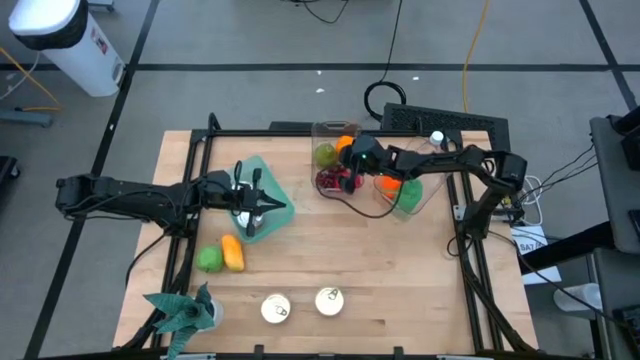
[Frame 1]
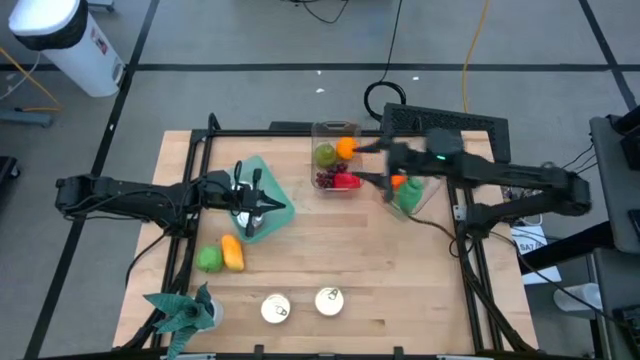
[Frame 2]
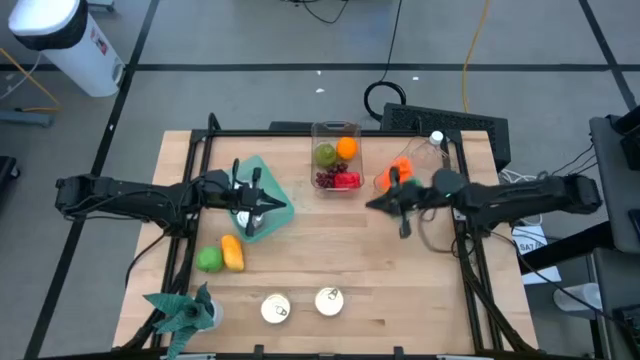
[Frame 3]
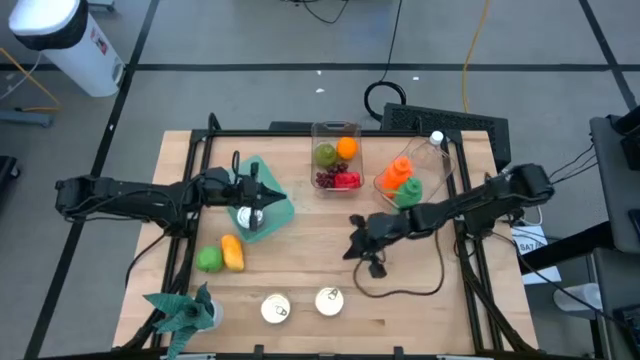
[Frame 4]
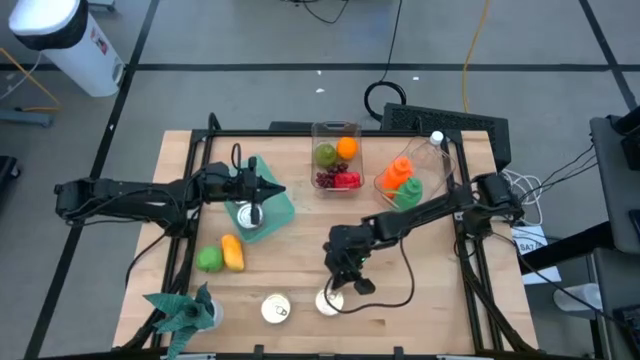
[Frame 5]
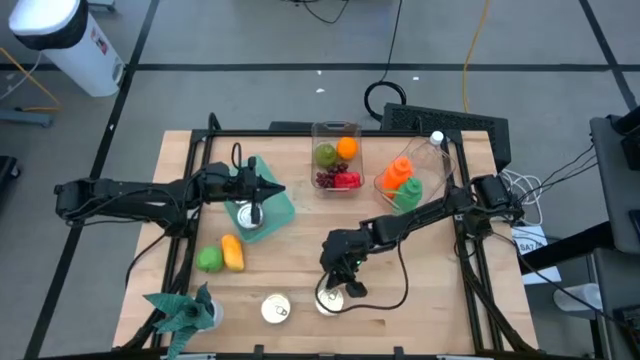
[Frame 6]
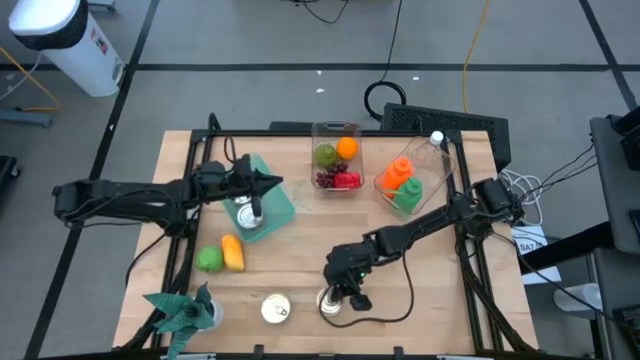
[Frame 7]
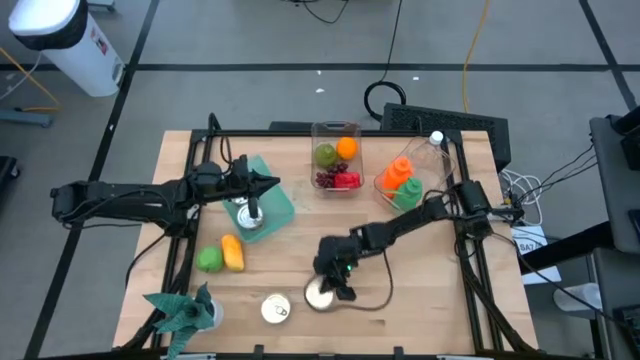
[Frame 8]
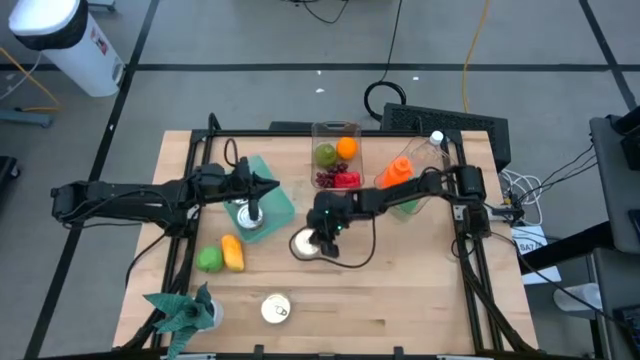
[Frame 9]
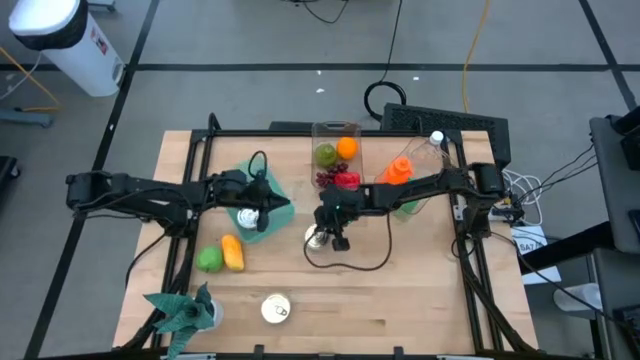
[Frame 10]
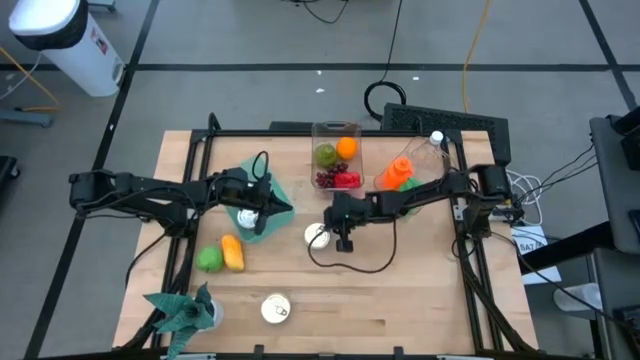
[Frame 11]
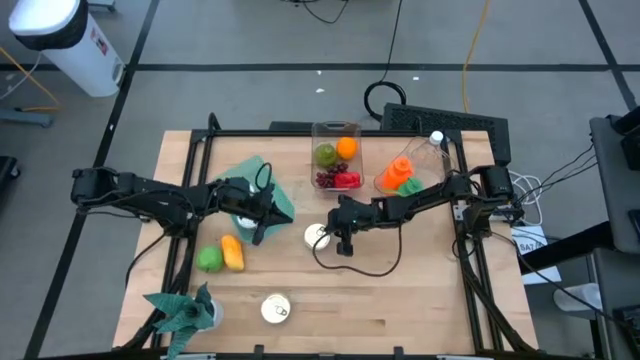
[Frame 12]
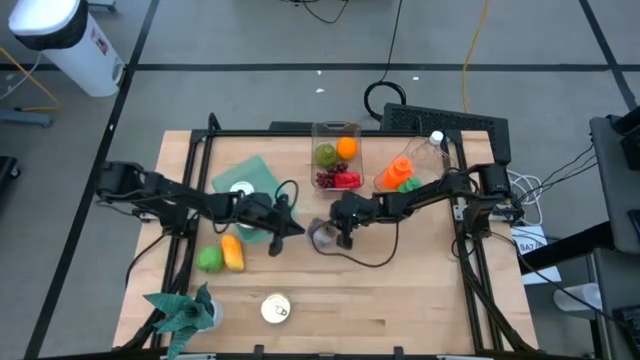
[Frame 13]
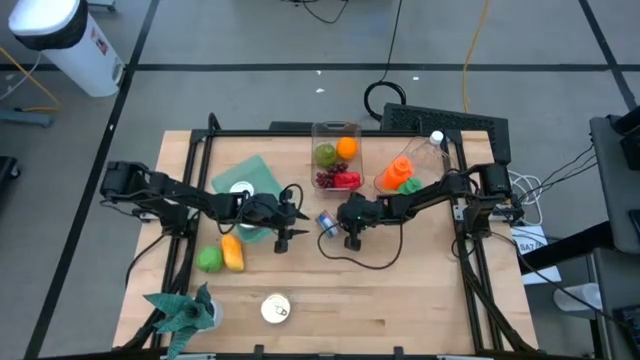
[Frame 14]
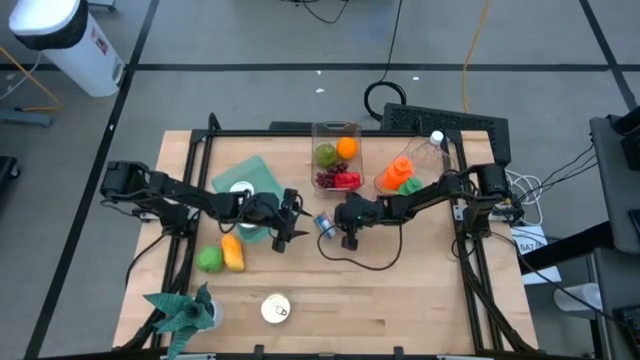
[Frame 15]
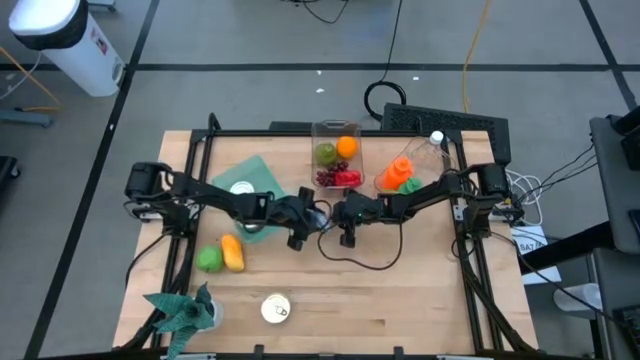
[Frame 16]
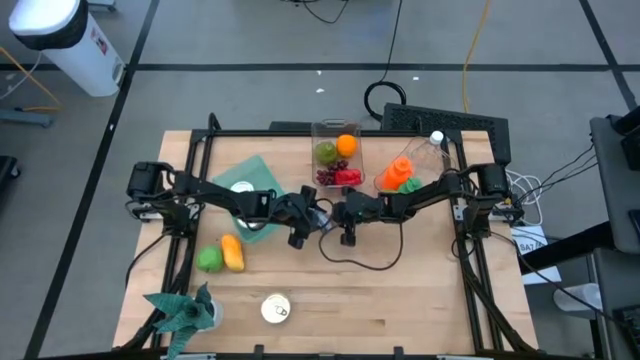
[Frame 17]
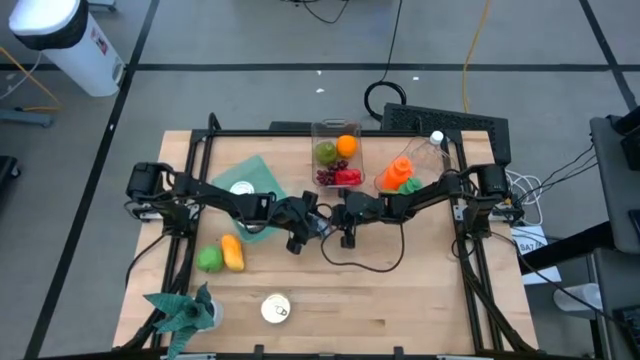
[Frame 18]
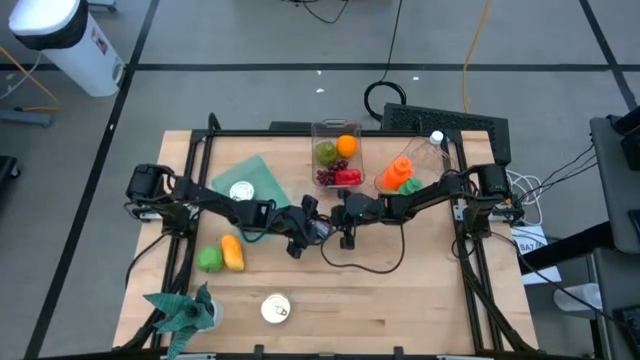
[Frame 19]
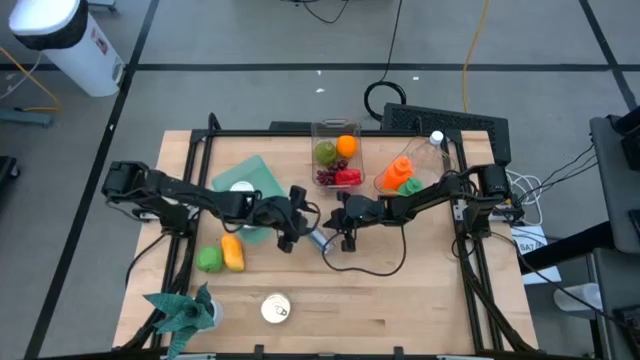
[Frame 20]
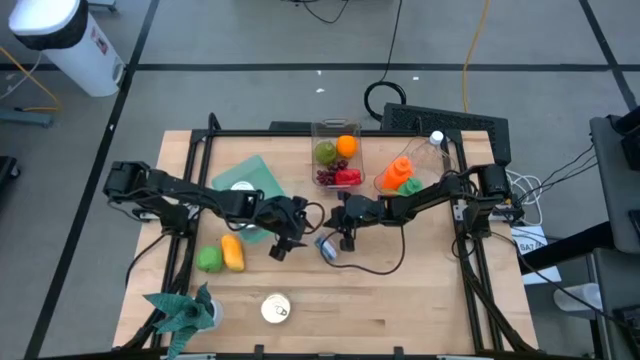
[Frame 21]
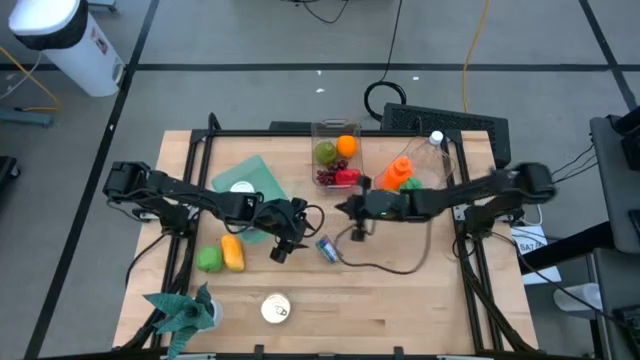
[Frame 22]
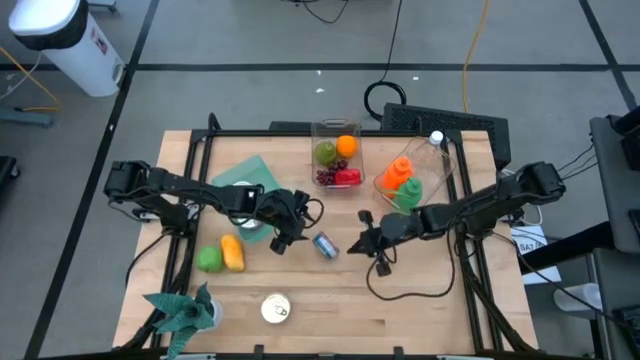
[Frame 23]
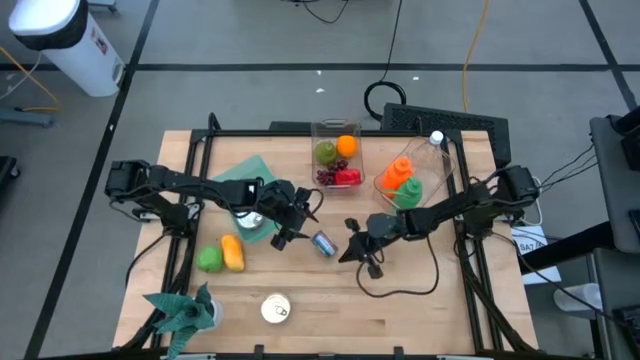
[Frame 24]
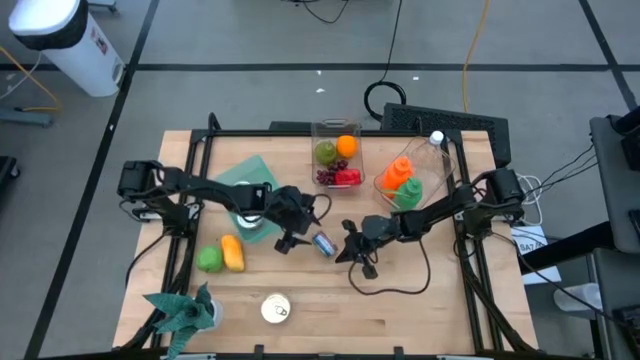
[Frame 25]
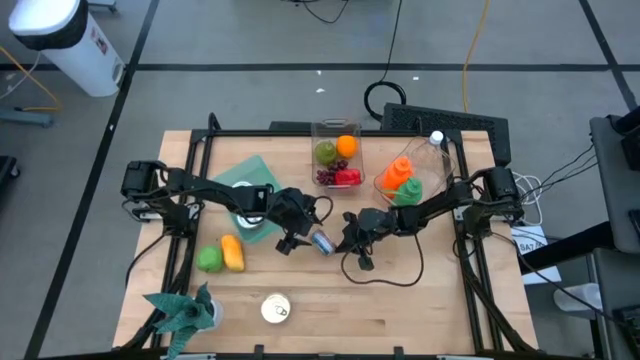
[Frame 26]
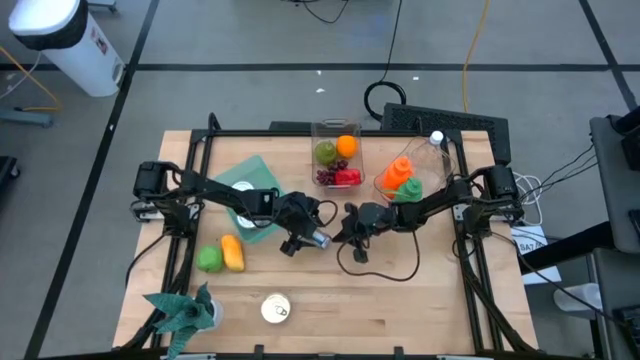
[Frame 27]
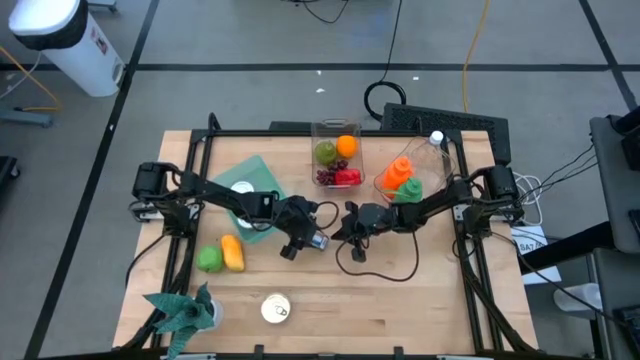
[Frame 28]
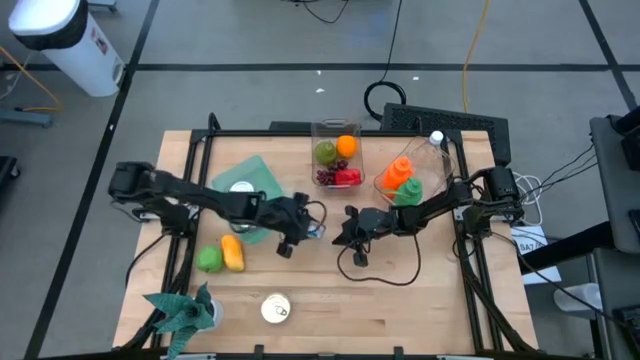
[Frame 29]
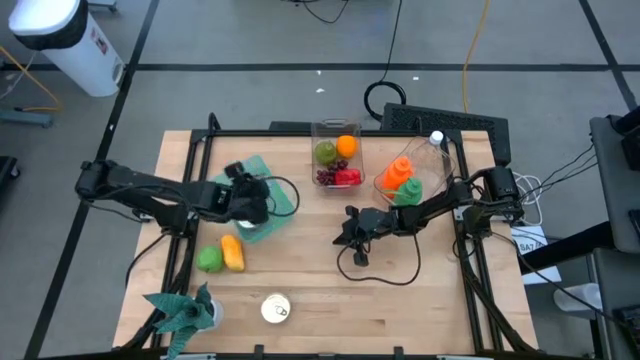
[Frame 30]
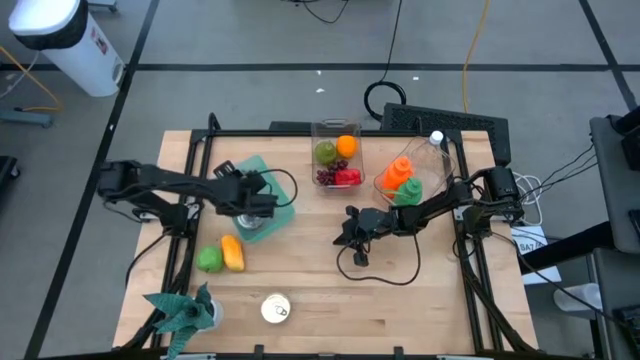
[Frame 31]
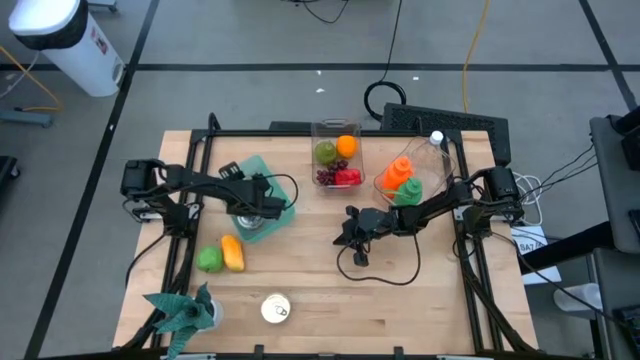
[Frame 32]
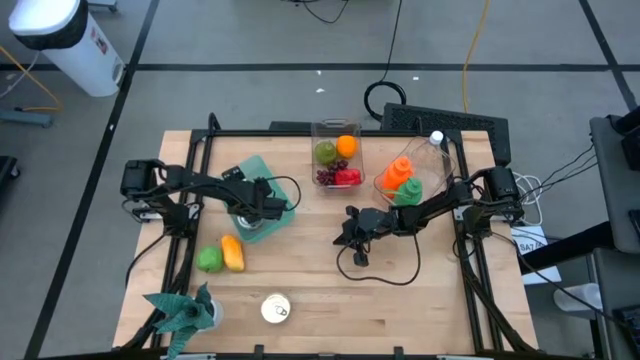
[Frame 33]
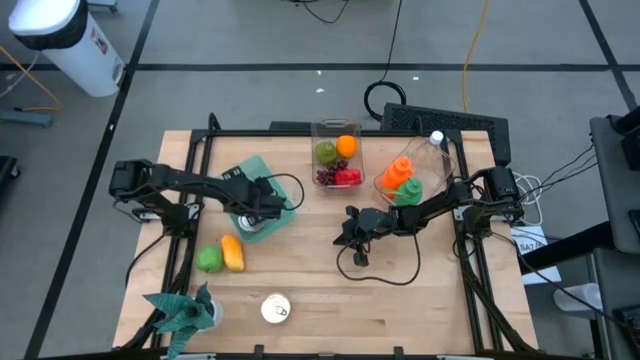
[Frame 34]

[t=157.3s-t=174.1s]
Task: Pick & Place Food Item
Put the right blue pink tuna can into the green bin
